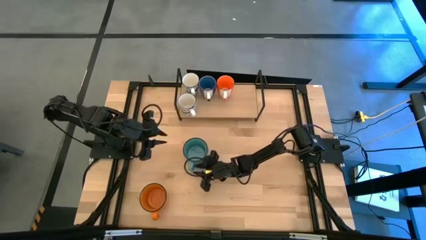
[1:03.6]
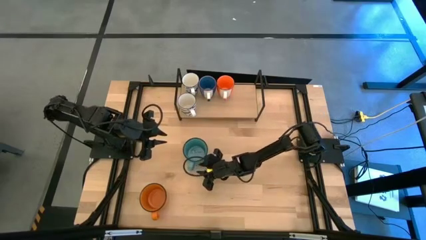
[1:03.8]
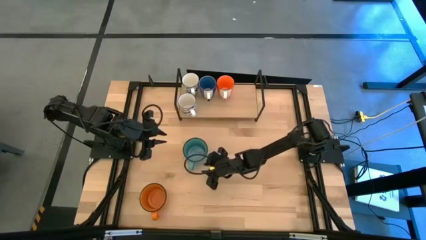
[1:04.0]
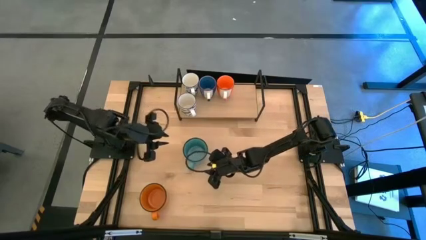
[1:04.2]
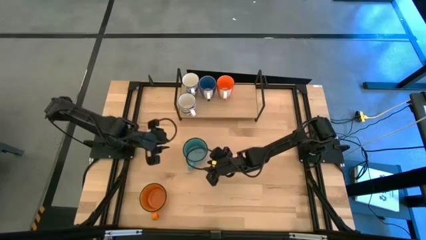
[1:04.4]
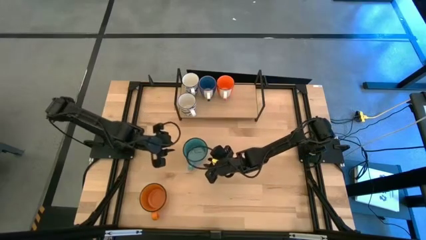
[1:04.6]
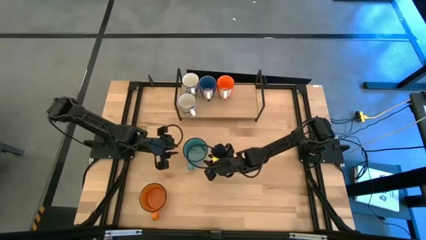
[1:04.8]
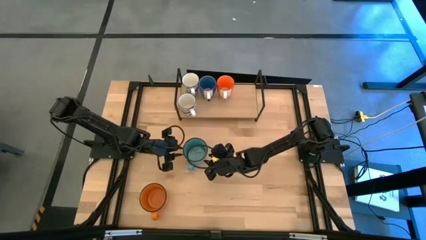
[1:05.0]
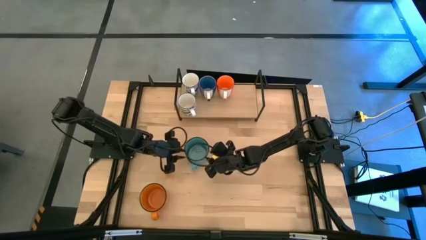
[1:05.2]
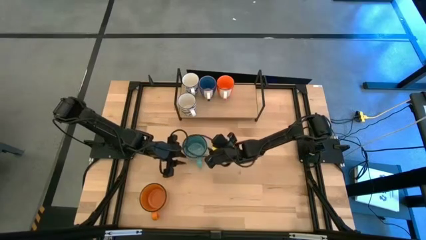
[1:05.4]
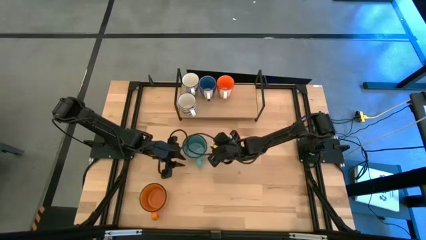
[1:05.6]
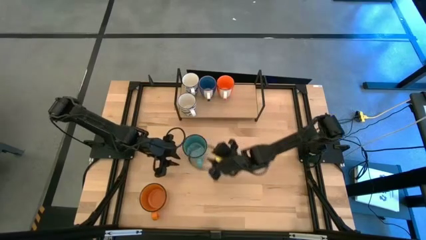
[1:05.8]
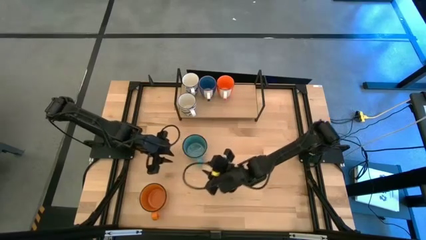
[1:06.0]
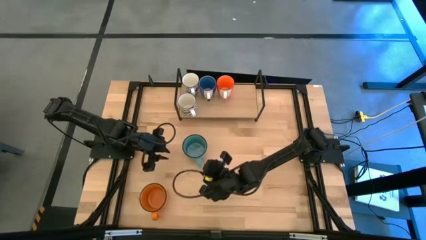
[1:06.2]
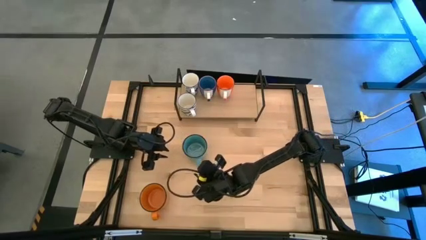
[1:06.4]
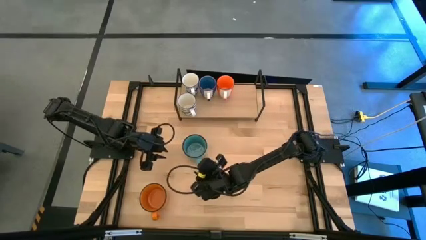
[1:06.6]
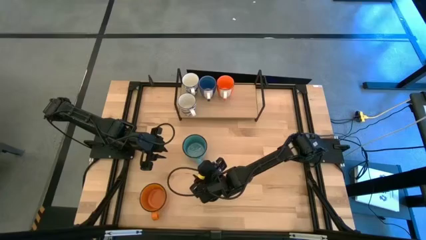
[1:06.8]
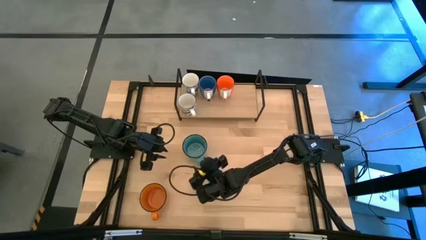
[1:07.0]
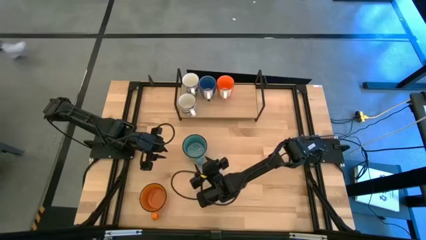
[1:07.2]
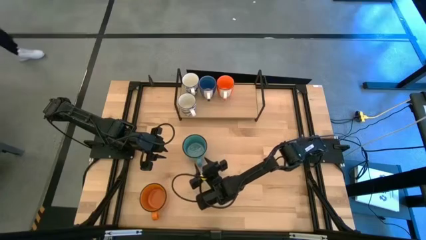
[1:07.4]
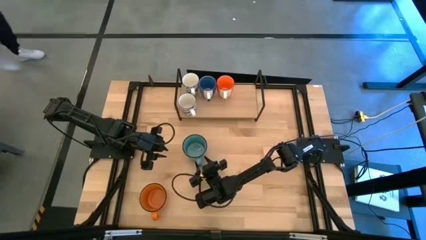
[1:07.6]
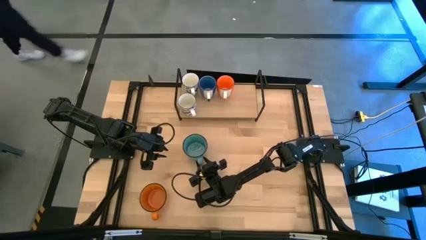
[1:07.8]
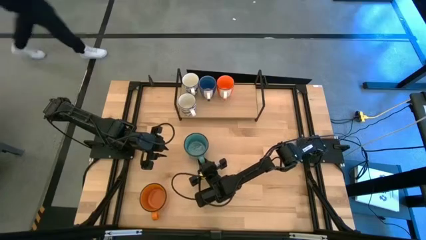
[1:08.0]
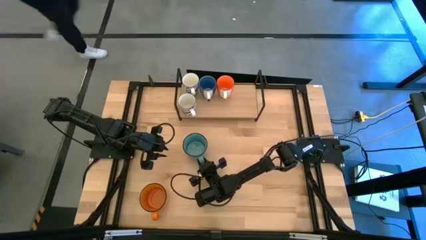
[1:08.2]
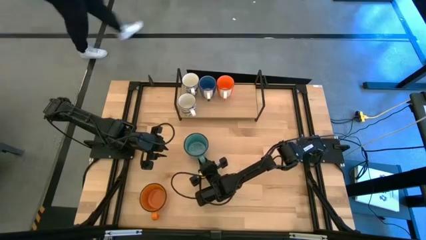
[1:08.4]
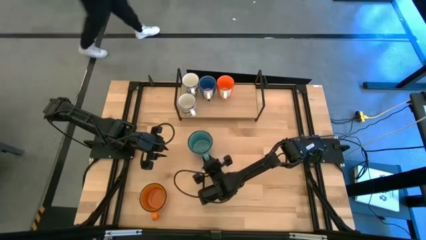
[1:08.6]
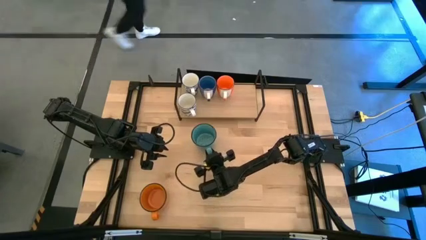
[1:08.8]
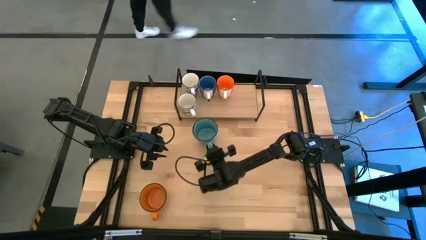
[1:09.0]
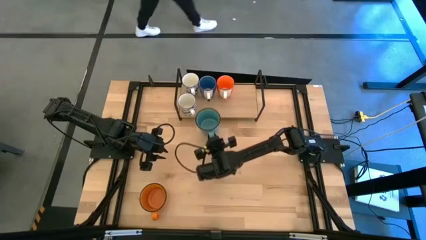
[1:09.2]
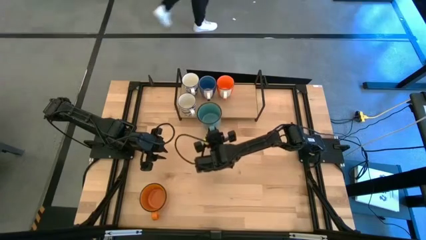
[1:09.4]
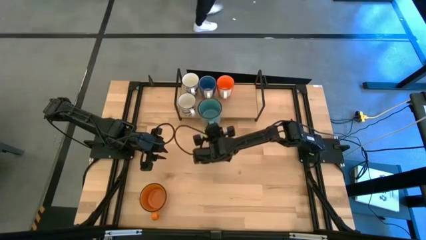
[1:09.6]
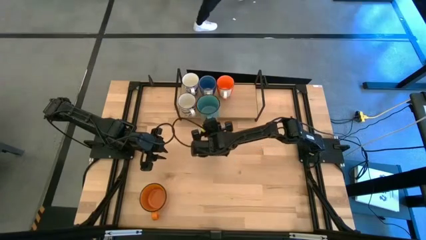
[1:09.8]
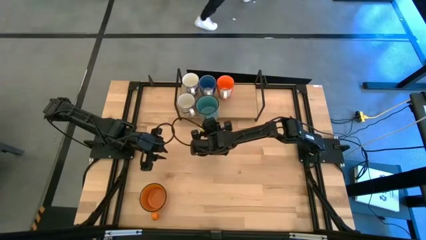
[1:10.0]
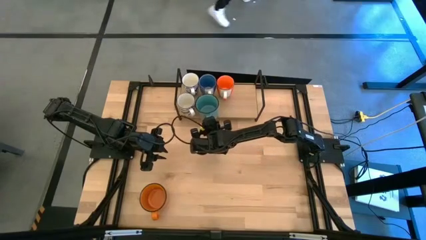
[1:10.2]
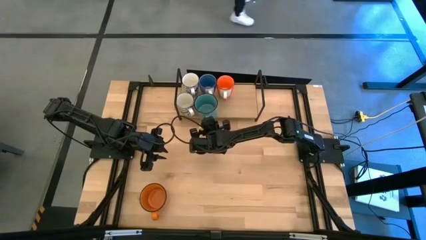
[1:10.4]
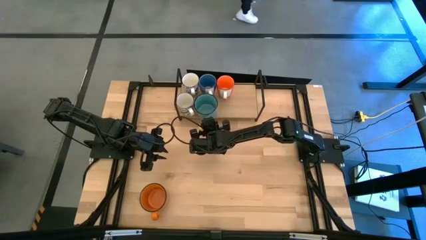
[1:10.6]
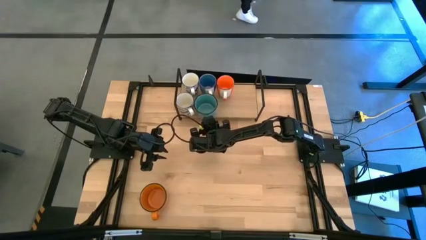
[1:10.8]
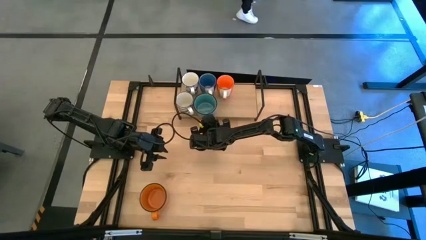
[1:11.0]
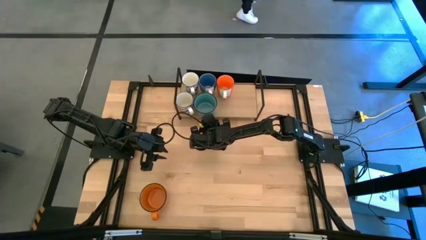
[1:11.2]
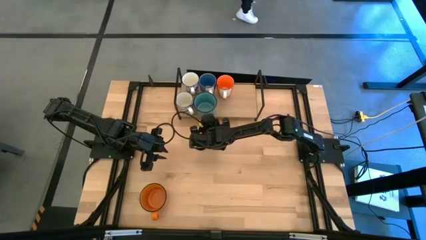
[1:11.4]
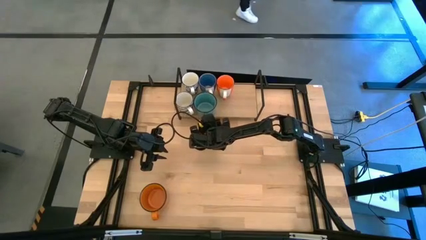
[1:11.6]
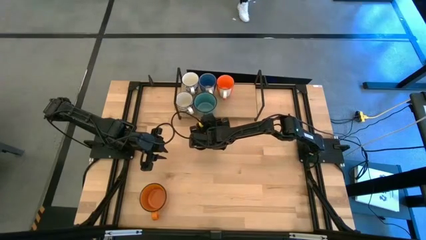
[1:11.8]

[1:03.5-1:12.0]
Task: Place coffee mugs
Put the green mug on the shelf

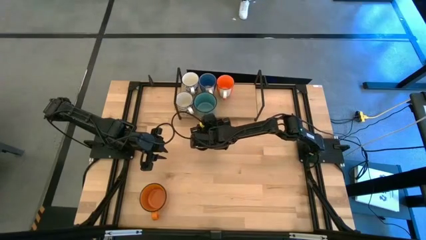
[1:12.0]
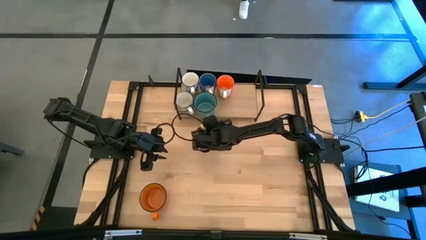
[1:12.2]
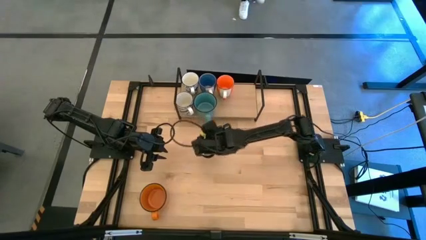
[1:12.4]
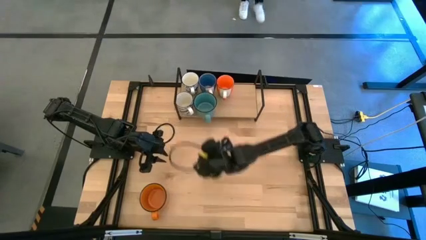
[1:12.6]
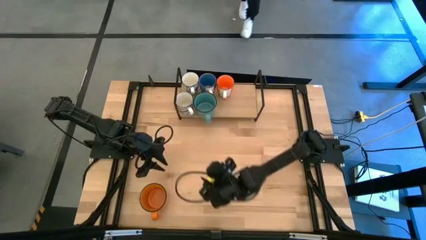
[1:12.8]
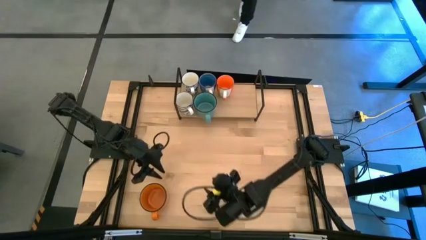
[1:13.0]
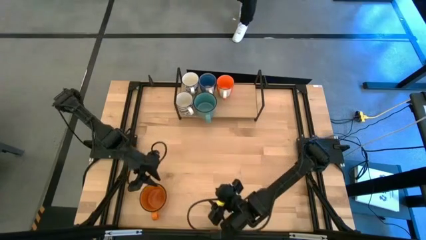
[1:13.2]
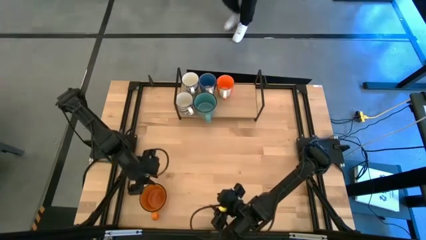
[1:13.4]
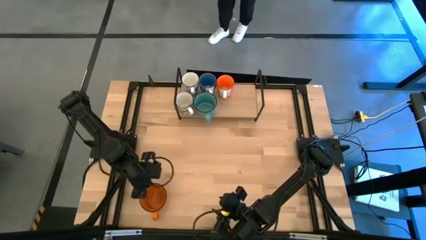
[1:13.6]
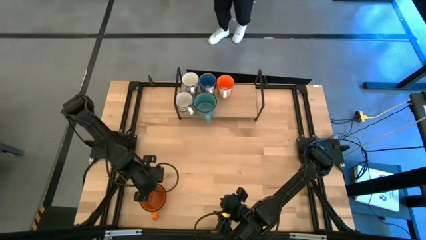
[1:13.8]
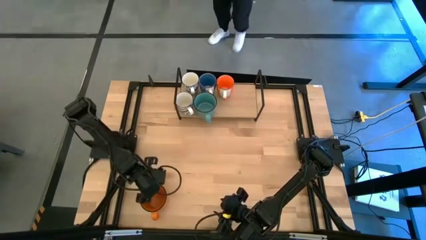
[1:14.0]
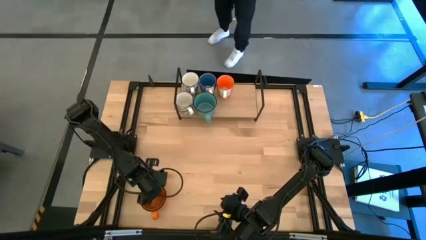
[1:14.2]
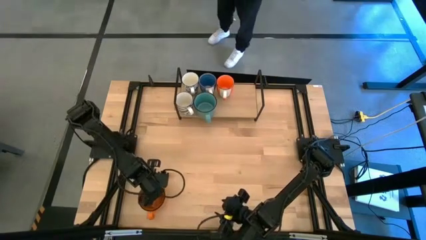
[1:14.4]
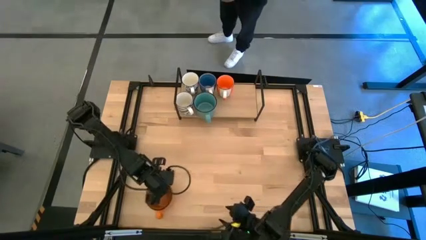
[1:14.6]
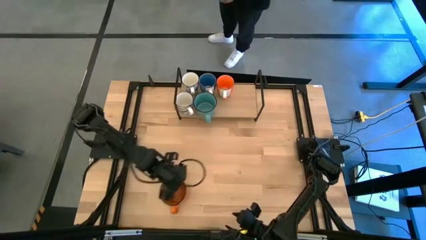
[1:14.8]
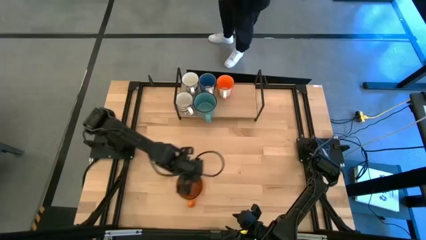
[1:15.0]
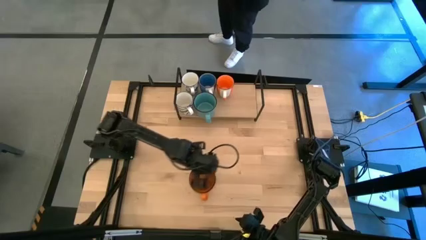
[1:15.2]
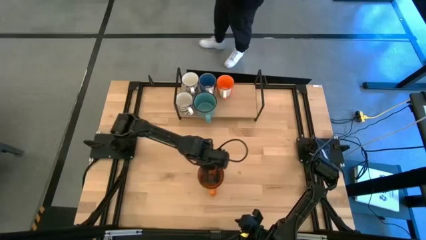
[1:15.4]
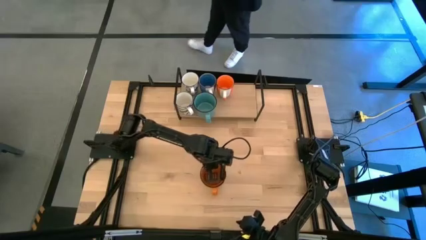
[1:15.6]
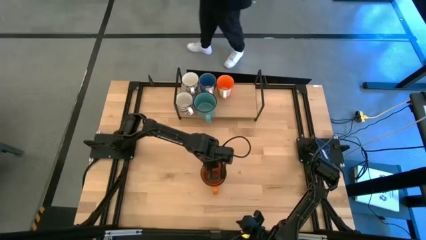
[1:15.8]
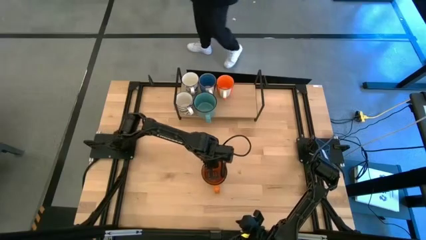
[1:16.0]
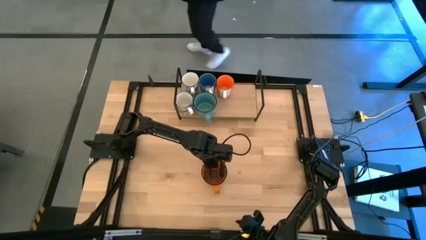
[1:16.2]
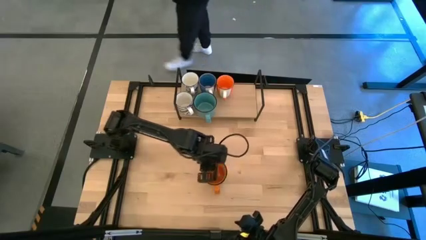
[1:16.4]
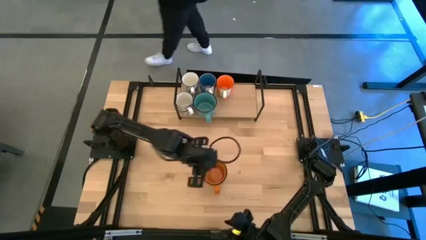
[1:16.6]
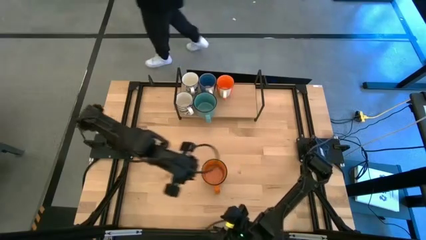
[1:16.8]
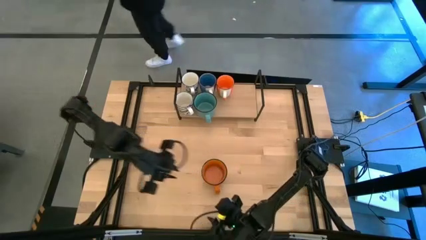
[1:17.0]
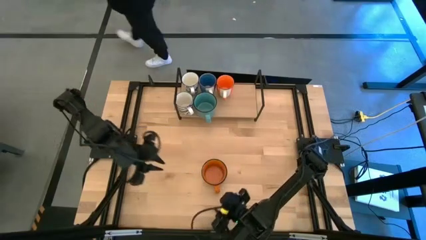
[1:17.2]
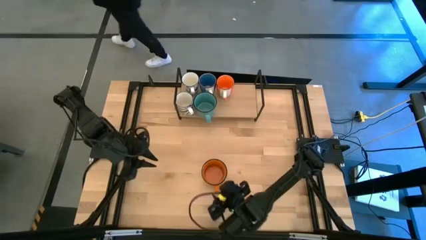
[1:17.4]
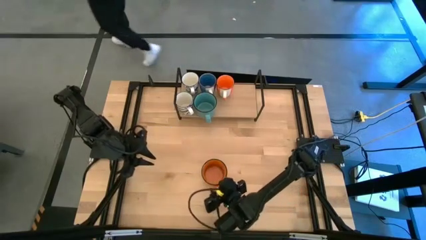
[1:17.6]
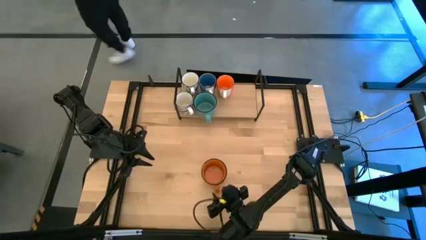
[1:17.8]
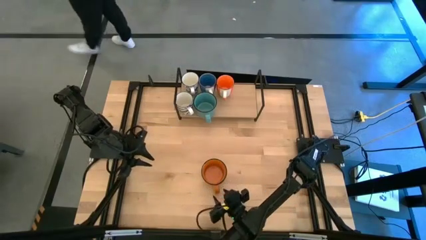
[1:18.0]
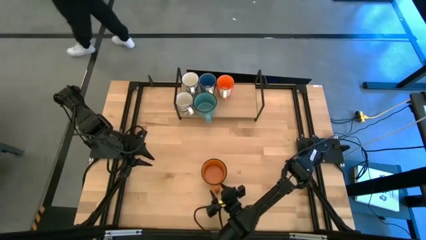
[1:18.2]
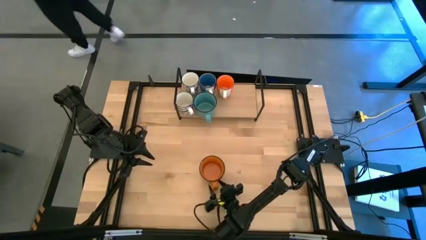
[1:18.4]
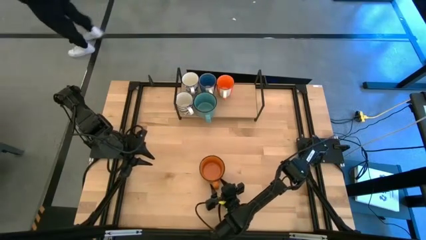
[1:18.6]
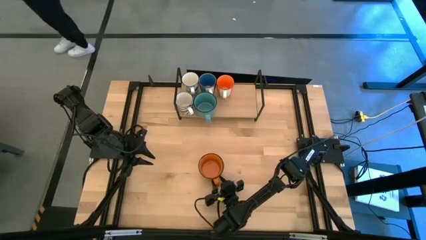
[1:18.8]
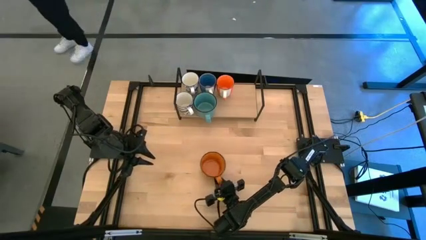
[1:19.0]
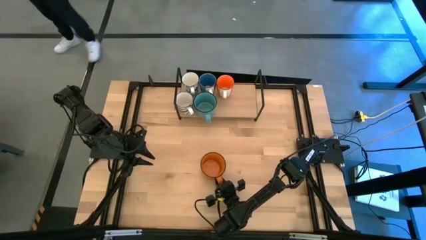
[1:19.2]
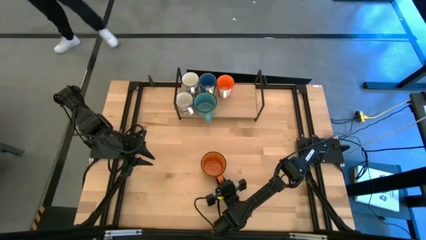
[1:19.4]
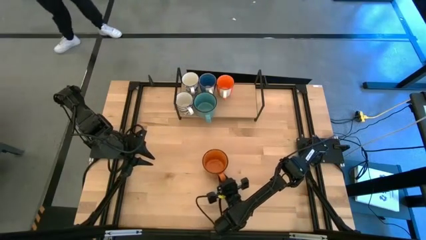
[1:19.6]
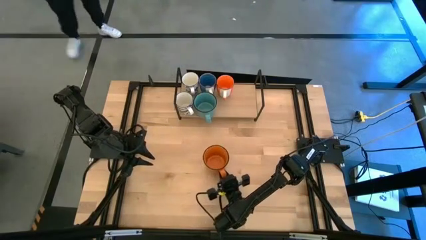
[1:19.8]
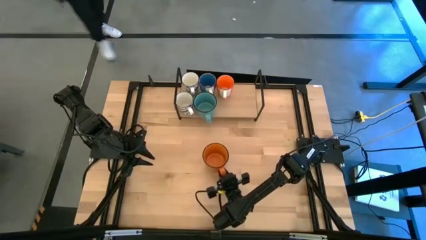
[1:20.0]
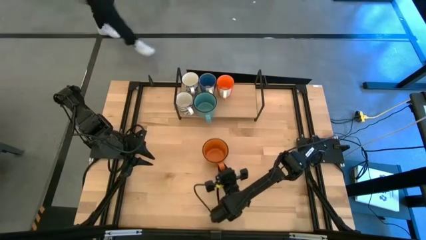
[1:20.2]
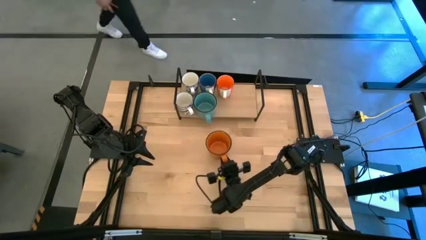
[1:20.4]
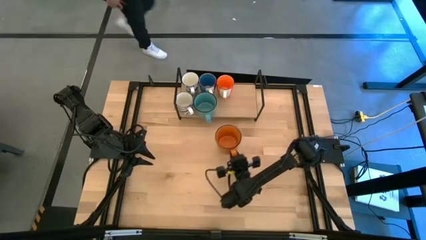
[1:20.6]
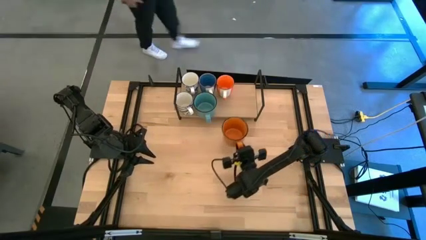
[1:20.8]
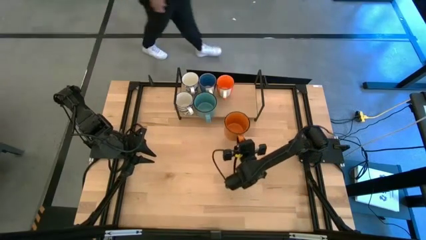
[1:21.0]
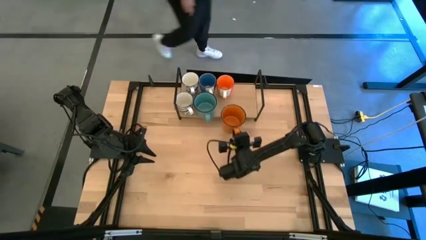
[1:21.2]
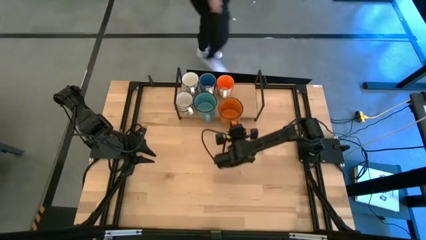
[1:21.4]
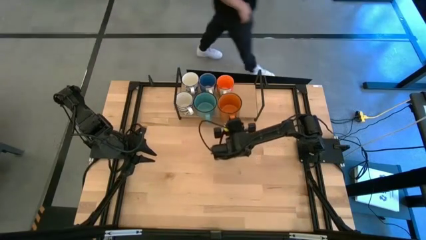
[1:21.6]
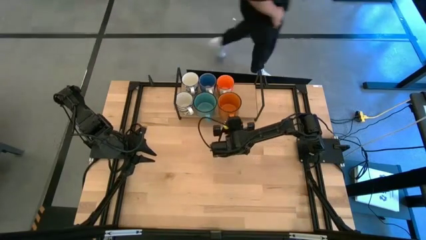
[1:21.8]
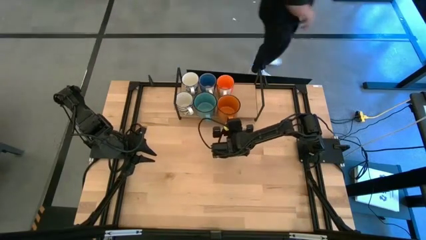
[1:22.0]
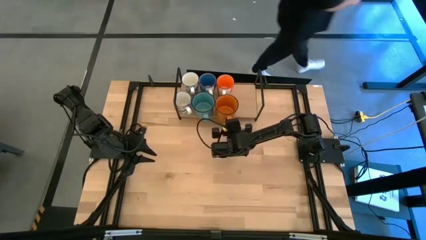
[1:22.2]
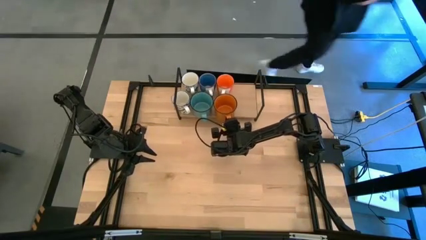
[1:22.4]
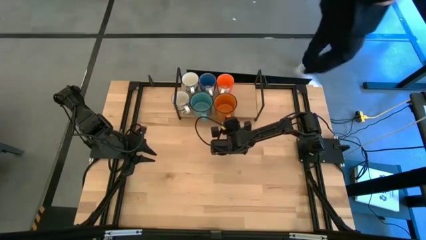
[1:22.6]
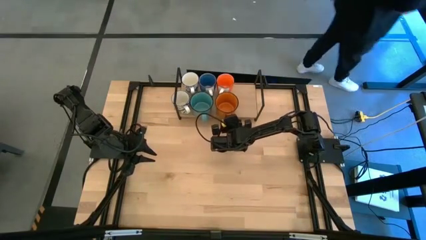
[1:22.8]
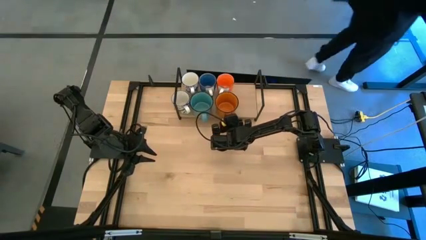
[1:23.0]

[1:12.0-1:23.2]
Put the orange mug on the shelf
